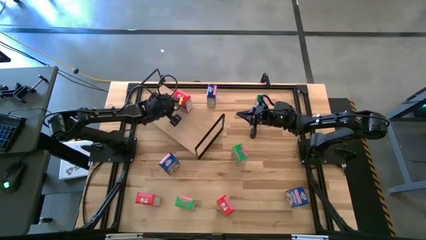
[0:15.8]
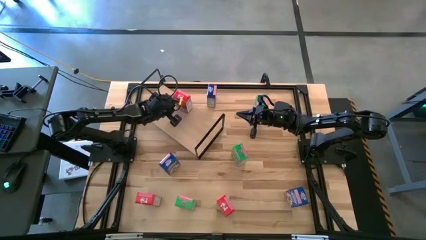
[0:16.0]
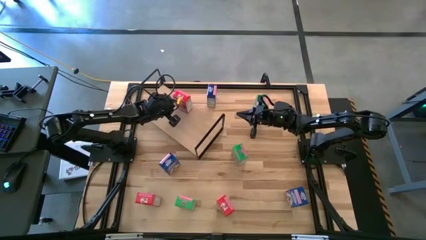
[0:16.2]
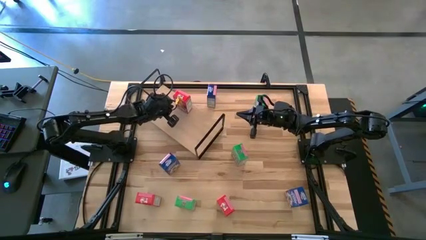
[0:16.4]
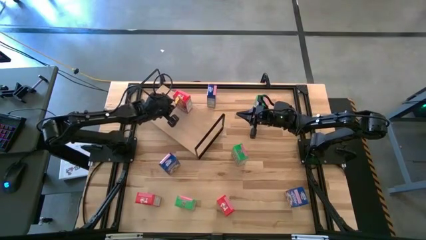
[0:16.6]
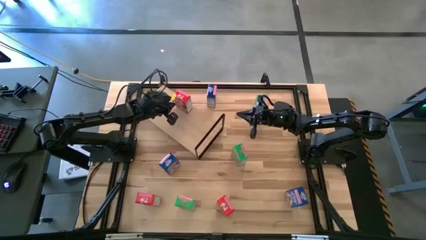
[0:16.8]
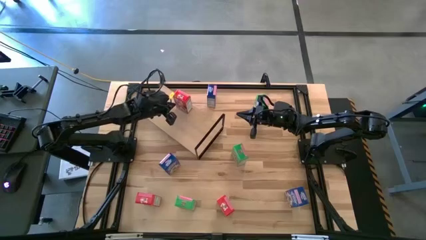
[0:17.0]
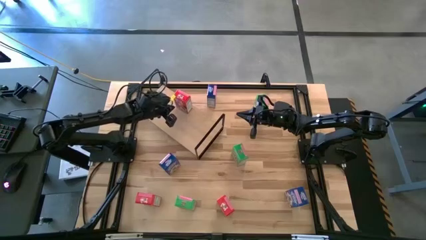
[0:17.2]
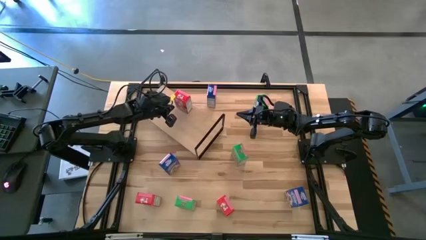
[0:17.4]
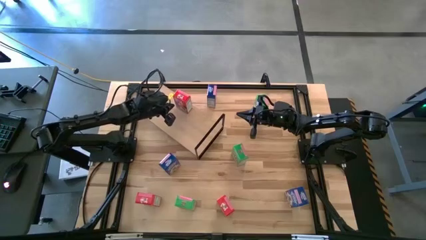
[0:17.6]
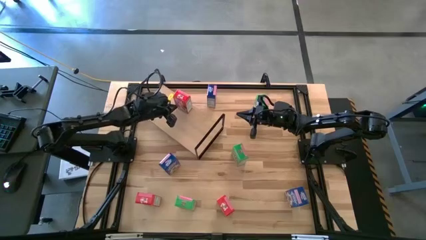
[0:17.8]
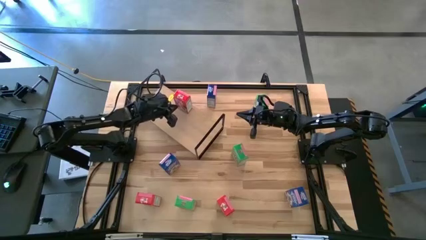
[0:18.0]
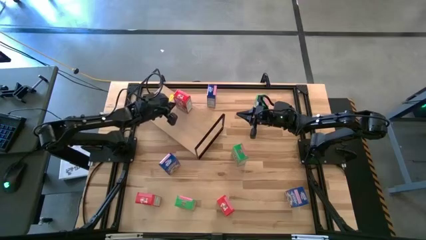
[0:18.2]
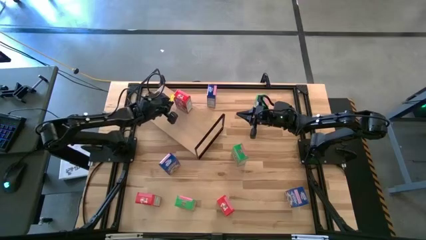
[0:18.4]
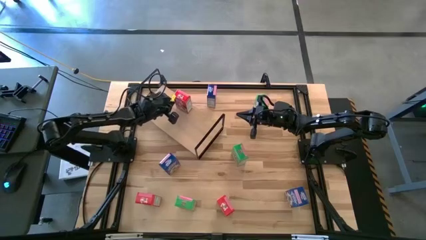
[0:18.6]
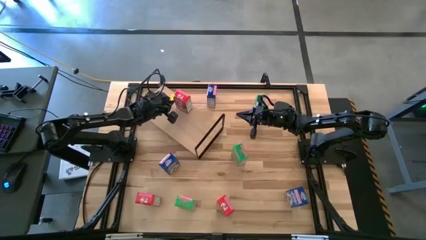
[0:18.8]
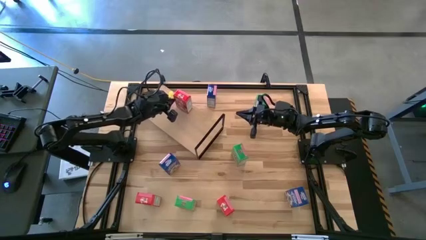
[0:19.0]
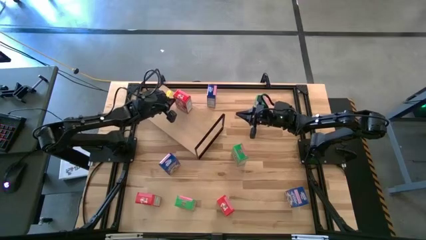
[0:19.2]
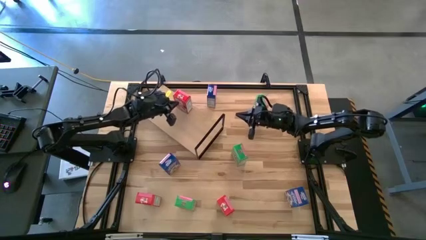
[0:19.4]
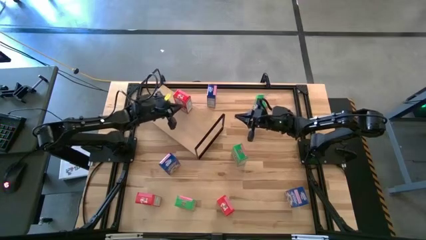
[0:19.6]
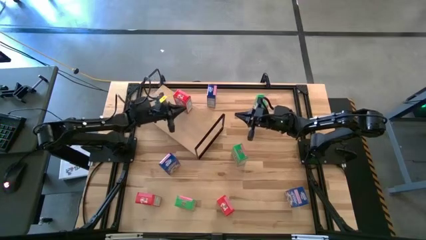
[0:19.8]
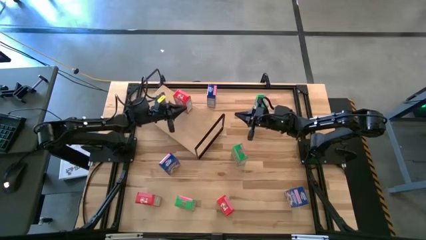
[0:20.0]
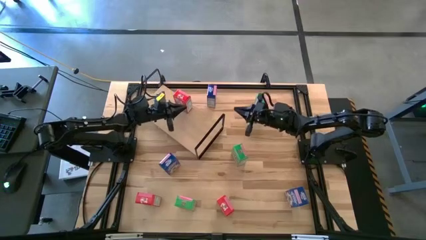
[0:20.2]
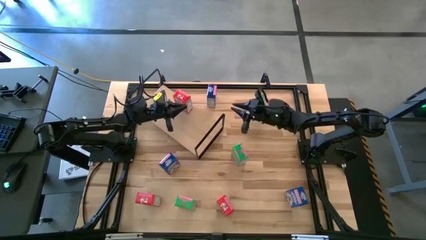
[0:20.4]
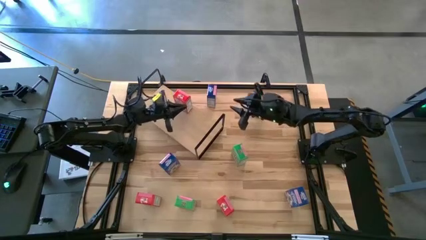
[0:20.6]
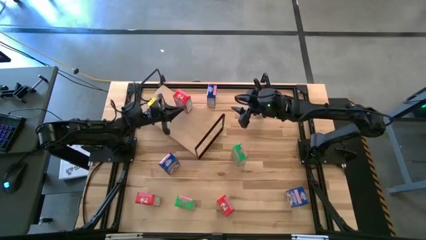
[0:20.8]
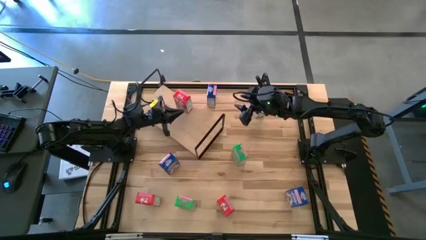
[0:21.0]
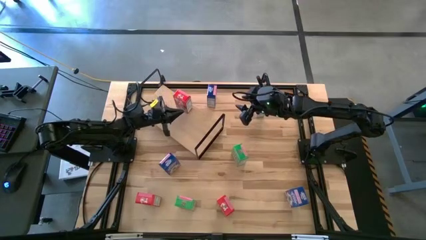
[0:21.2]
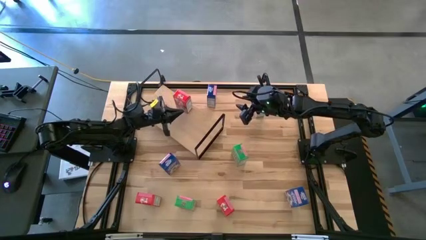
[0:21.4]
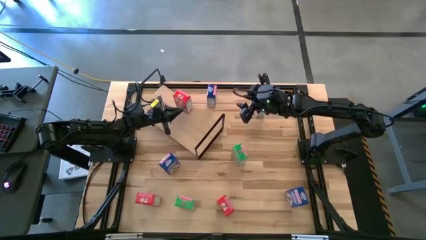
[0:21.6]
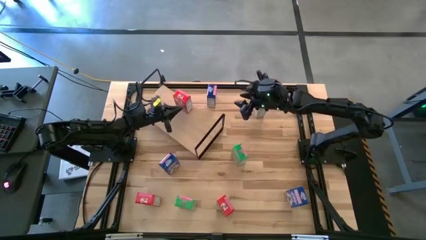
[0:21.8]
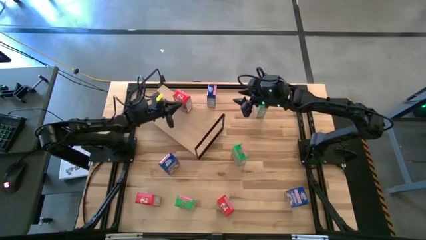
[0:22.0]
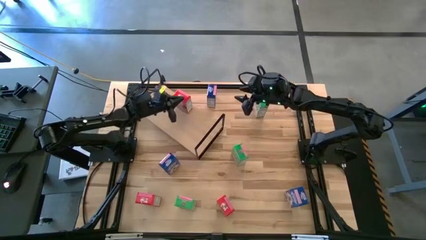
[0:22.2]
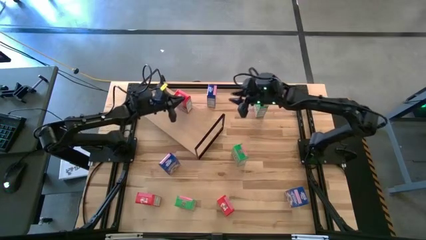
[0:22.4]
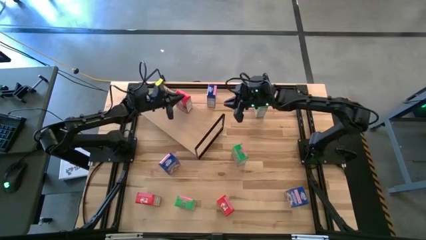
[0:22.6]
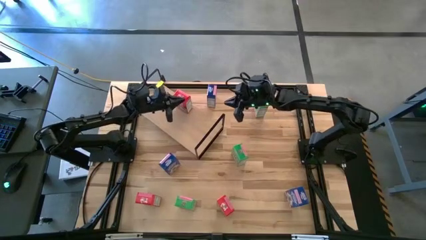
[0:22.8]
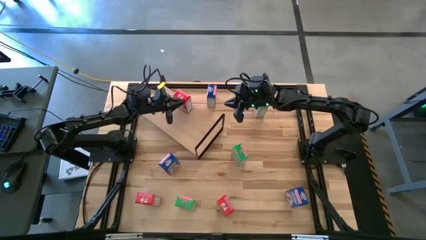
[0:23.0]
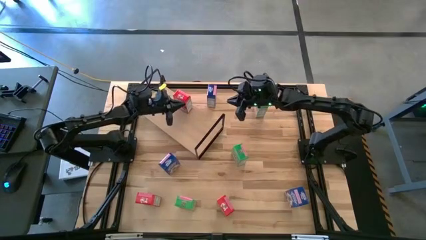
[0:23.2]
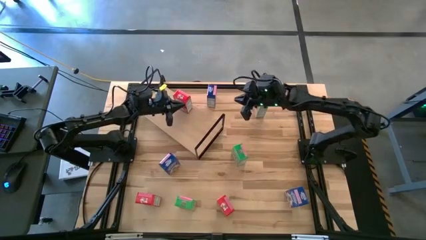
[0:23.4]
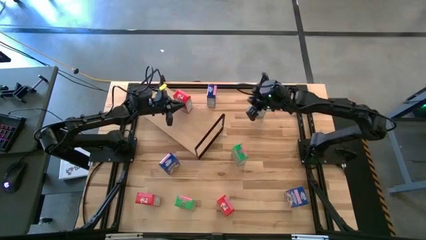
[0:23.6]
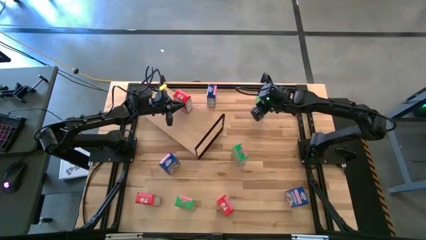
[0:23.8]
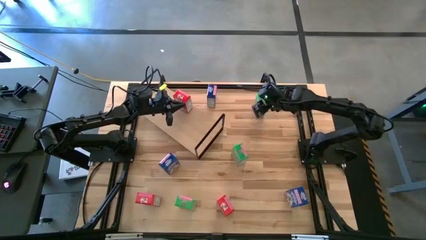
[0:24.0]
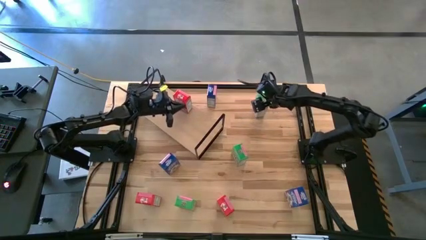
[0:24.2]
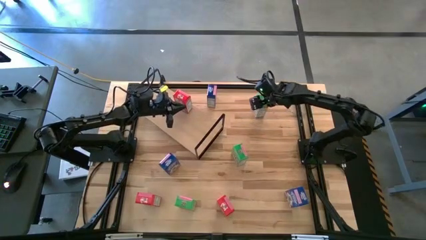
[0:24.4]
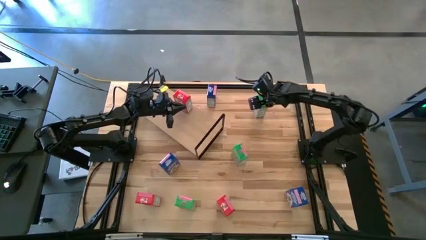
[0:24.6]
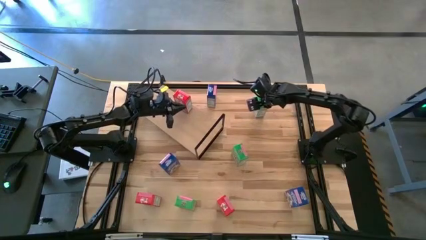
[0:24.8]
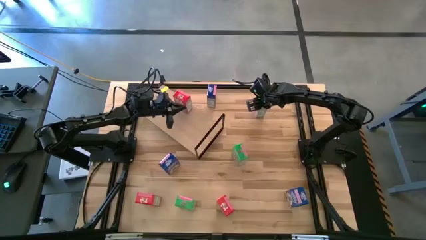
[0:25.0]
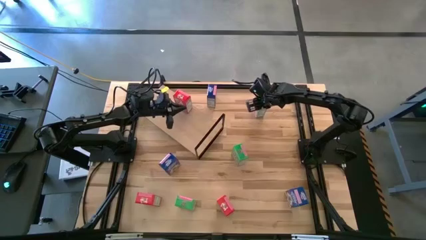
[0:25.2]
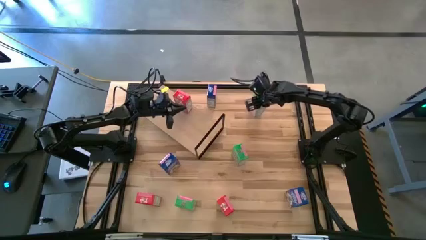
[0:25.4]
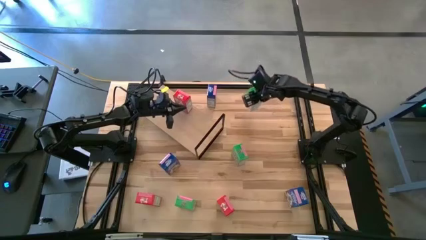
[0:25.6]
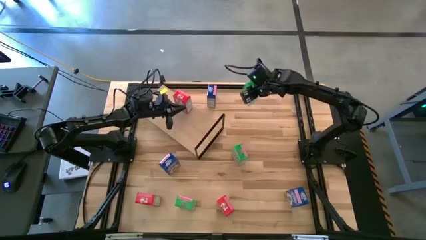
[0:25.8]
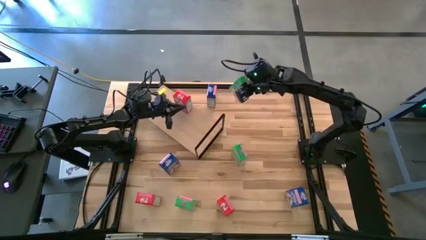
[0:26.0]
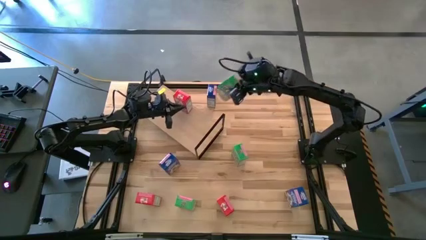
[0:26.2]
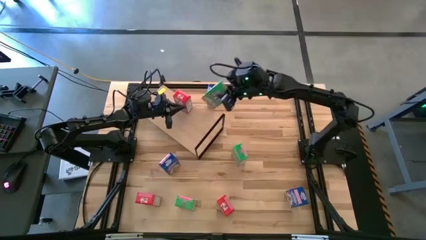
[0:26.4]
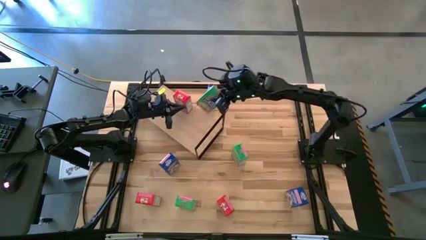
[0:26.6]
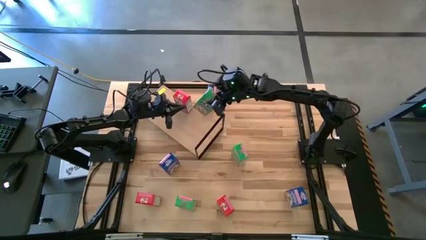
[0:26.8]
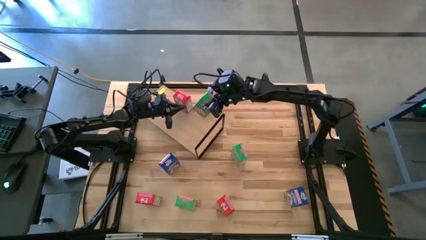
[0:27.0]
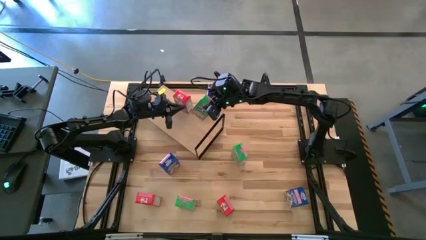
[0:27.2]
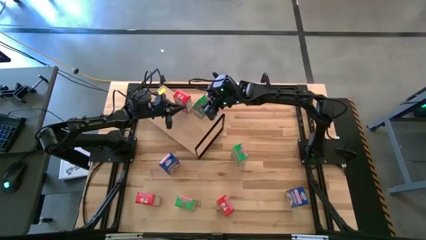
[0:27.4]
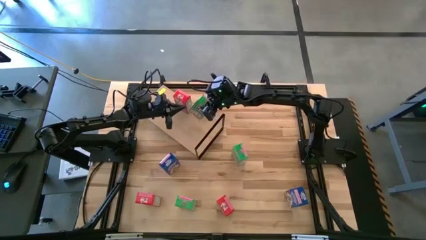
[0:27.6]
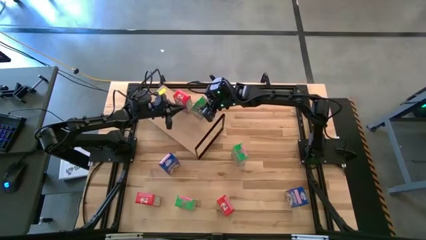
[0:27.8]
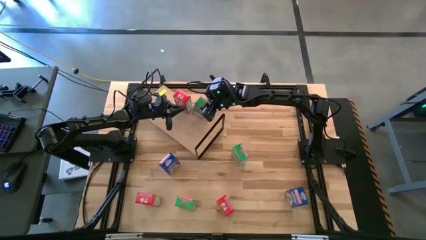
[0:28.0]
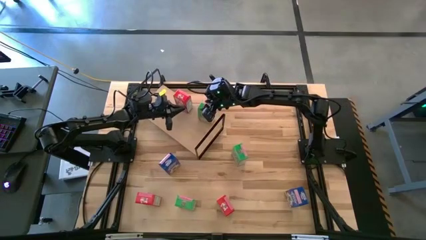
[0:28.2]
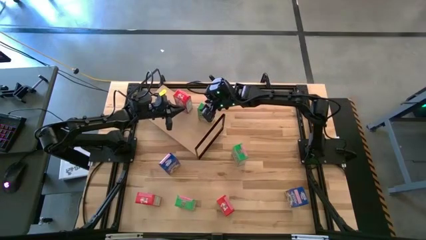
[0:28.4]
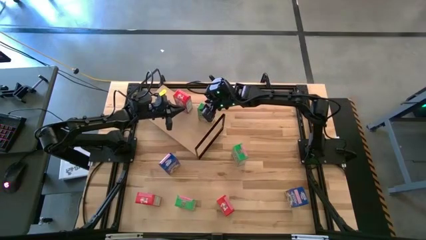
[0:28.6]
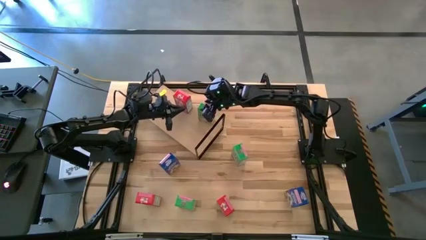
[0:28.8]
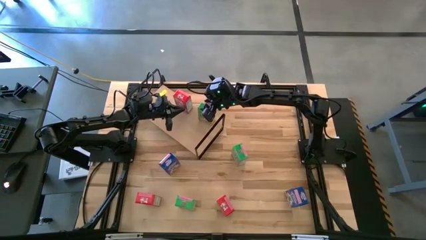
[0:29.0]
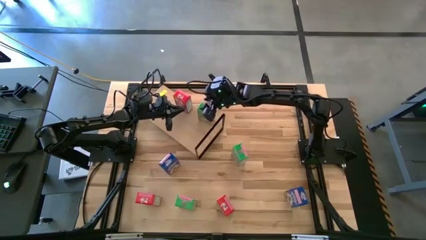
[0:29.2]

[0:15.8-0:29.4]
Task: Stack cereal on shelf
Put the top green cereal on the shelf
